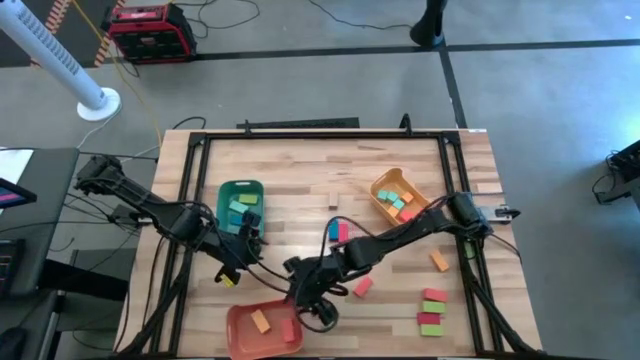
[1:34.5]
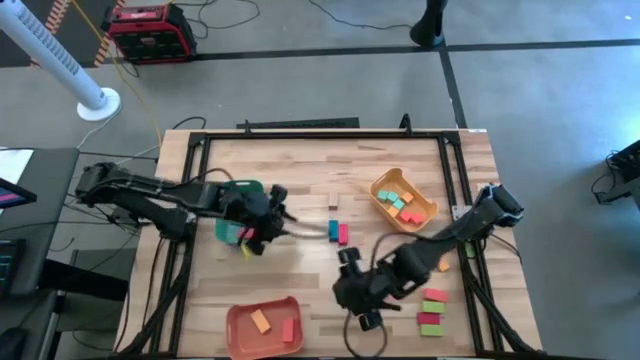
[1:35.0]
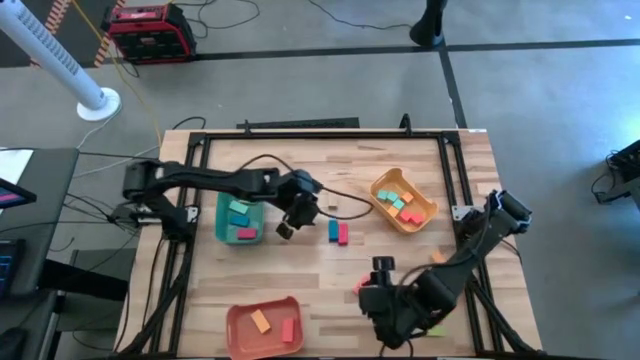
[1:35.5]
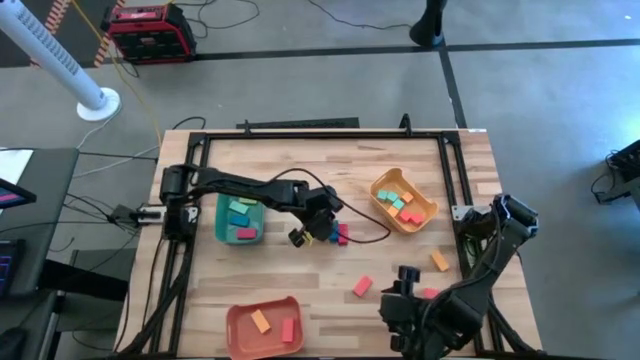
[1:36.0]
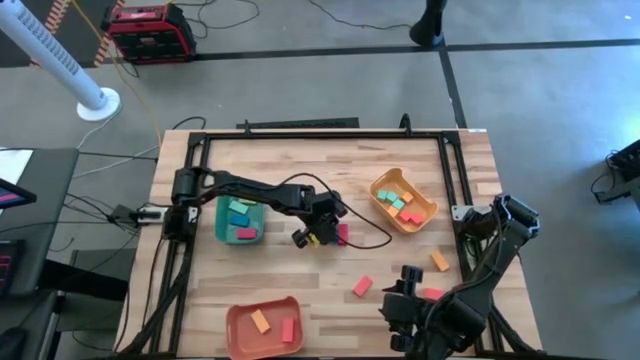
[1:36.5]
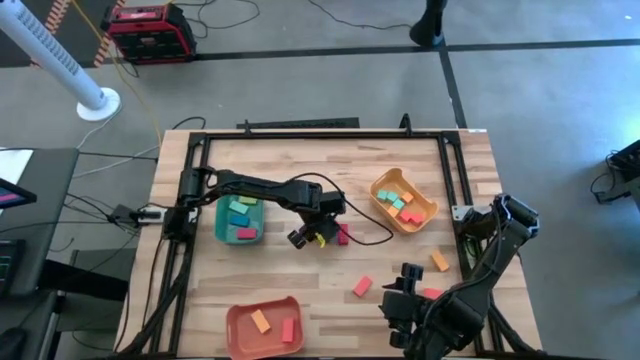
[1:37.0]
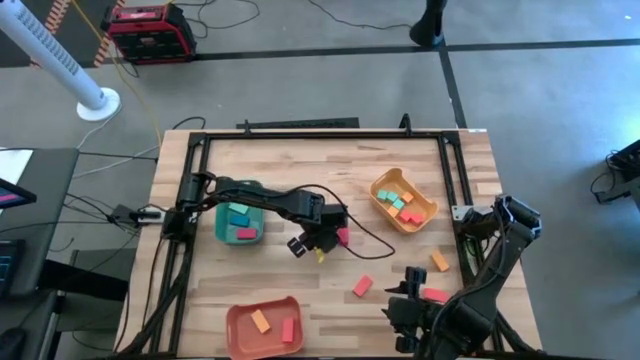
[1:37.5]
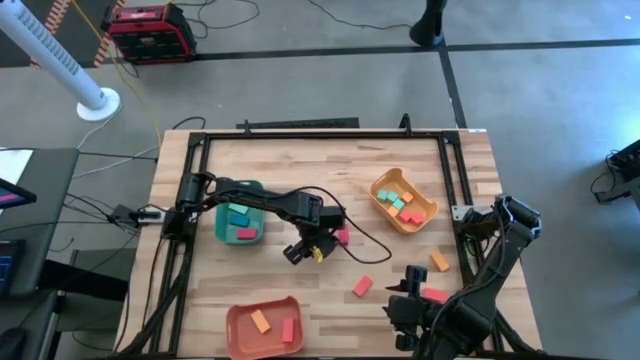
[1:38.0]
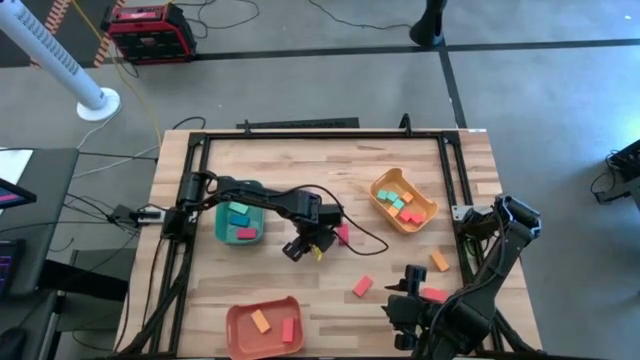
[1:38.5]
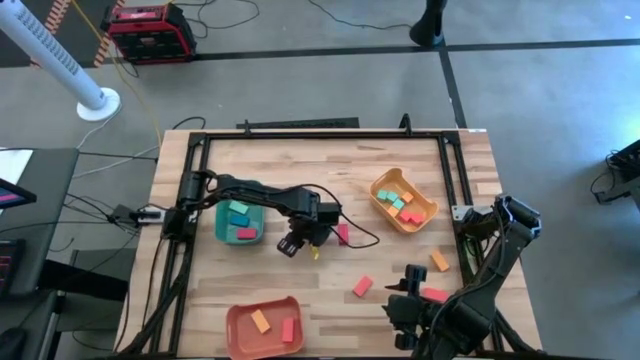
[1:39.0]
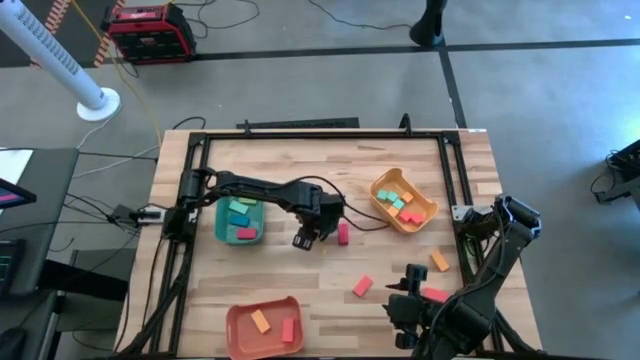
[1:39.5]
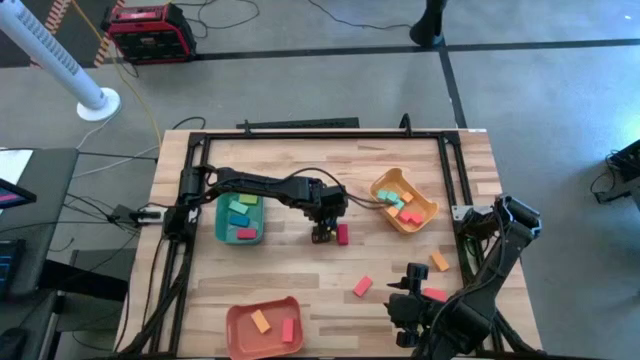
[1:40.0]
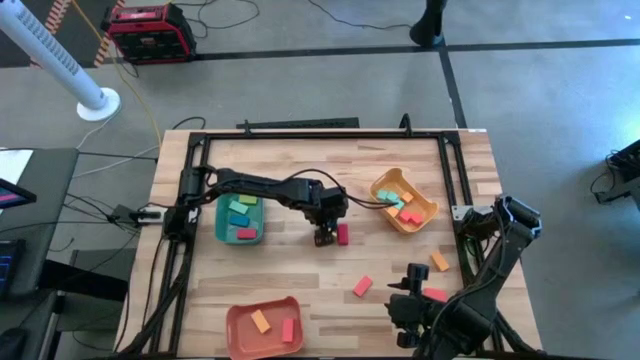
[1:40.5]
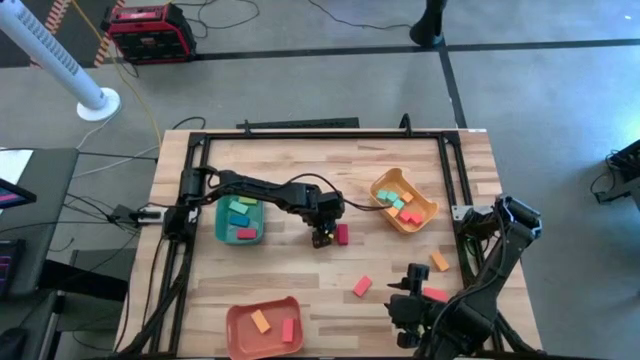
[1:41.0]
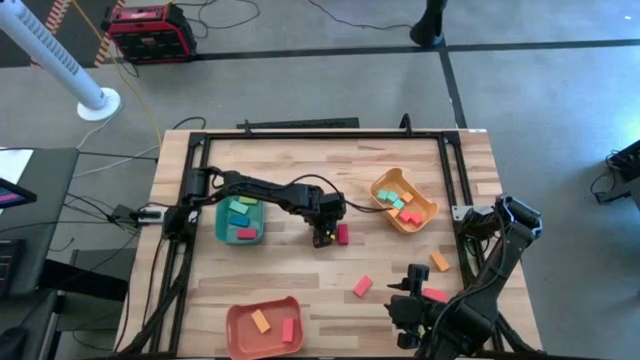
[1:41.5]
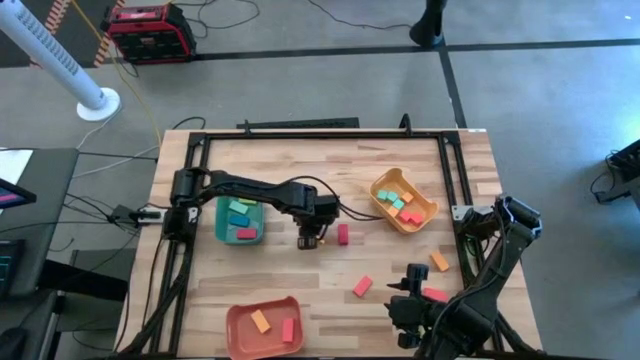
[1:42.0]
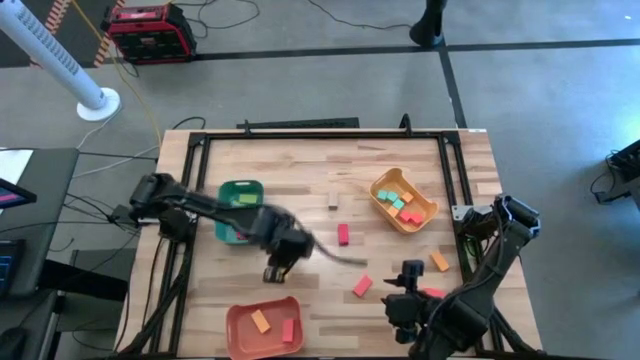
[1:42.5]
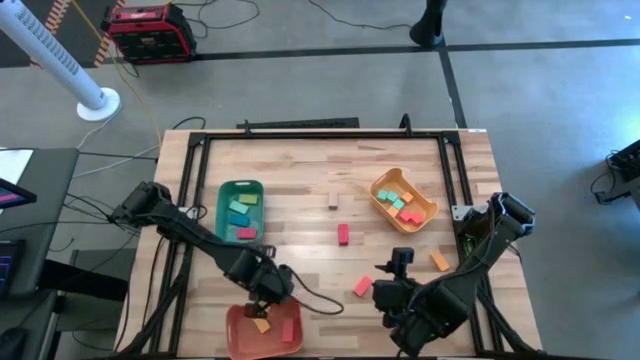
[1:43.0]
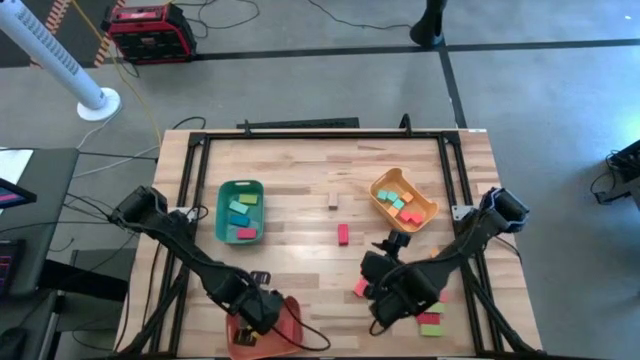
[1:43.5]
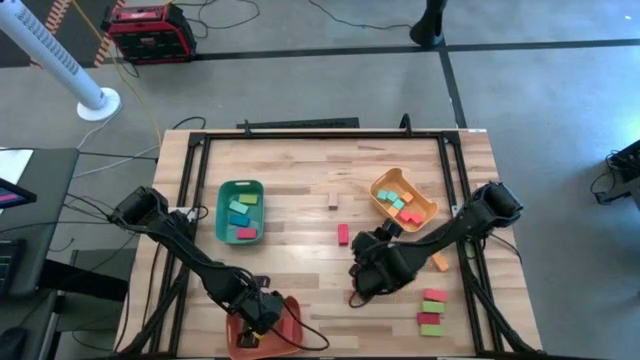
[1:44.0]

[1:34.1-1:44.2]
Task: Sort blocks by size
Put the thick blue rectangular block into the orange bin

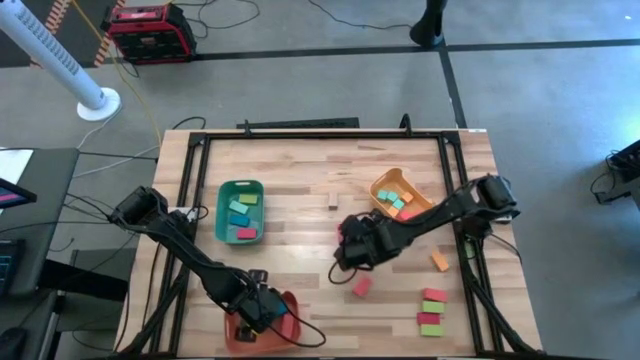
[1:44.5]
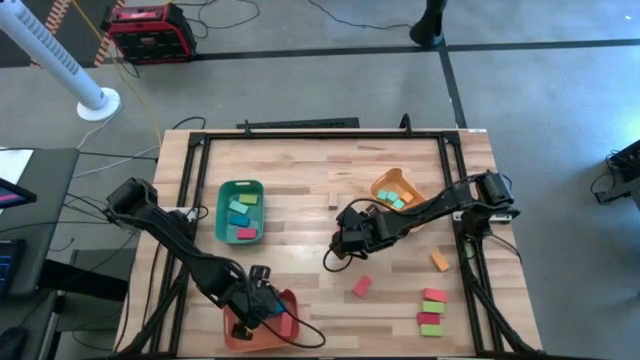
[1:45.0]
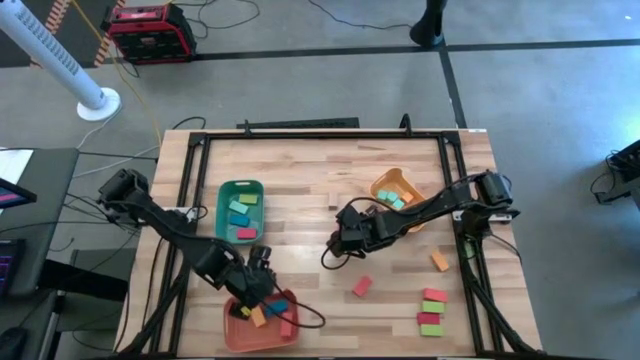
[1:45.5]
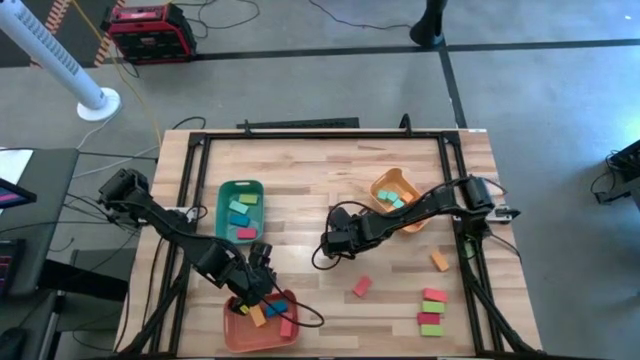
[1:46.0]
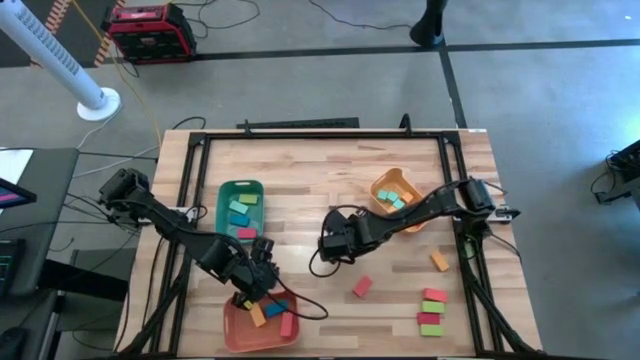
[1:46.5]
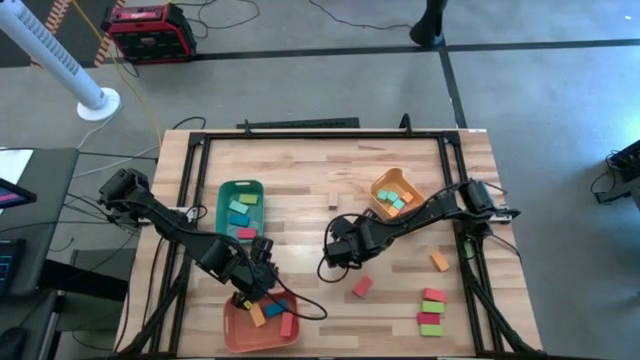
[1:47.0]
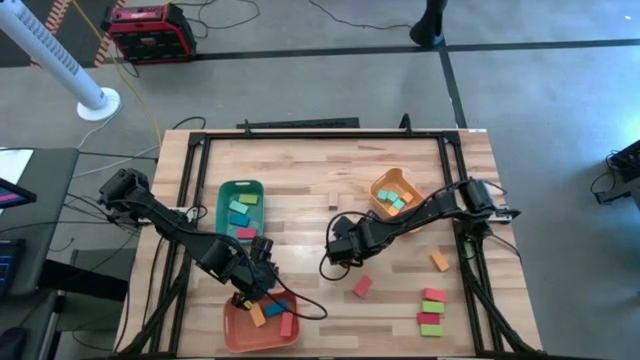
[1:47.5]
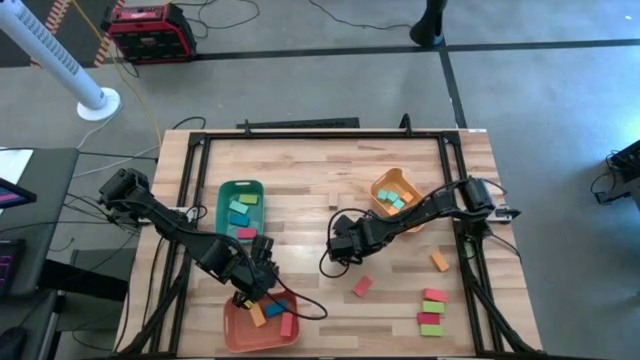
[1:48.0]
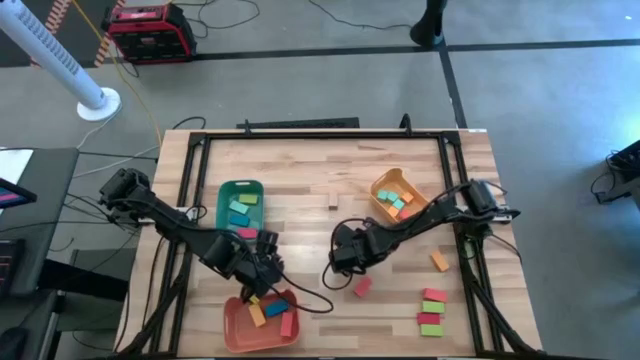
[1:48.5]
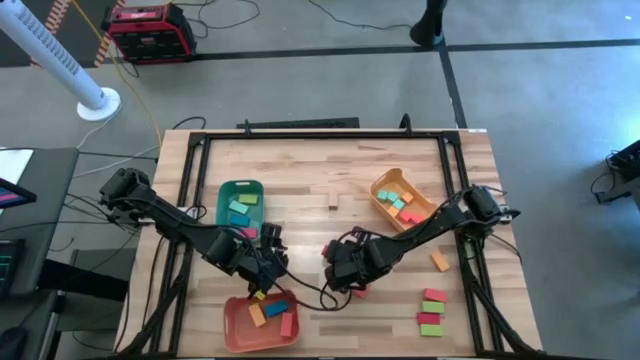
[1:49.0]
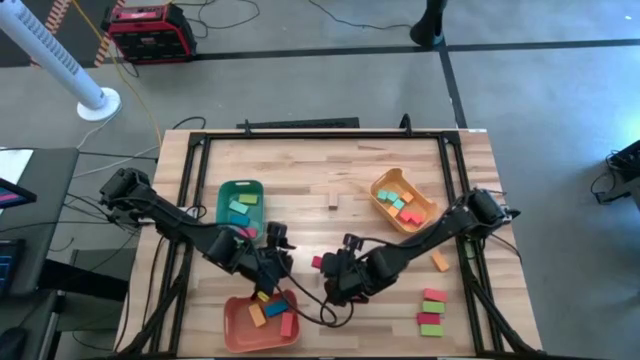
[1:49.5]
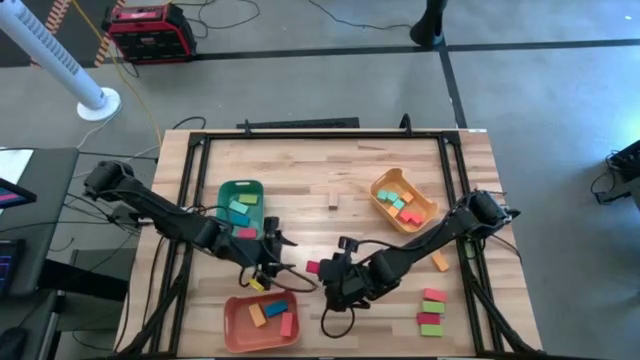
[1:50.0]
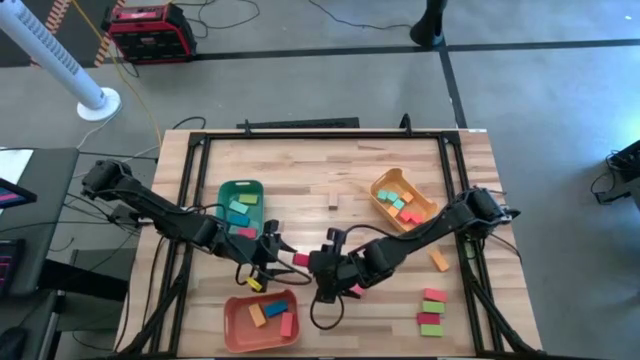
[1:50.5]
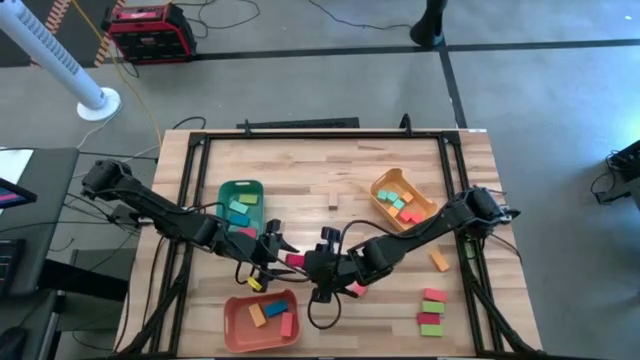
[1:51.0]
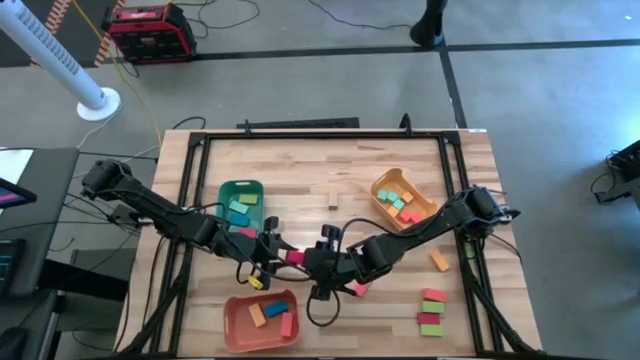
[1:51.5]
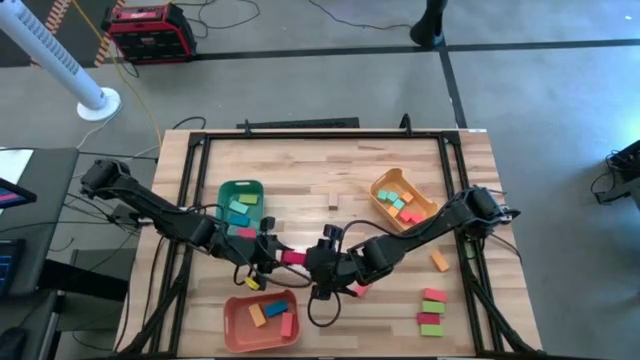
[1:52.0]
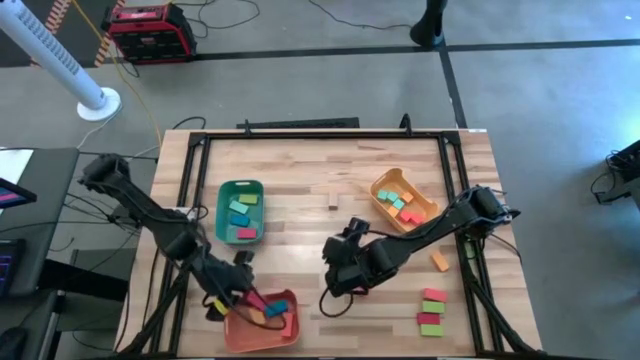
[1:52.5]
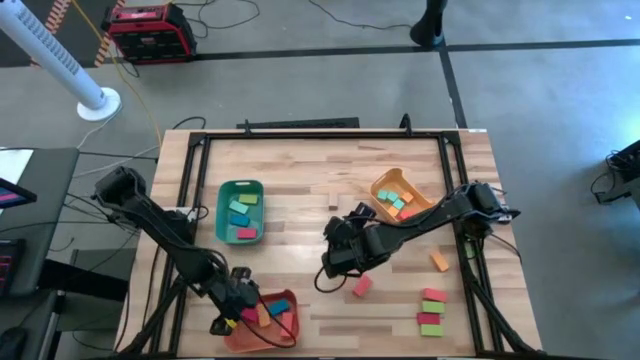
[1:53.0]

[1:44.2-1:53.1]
Put the thick red rectangular block into the orange bin

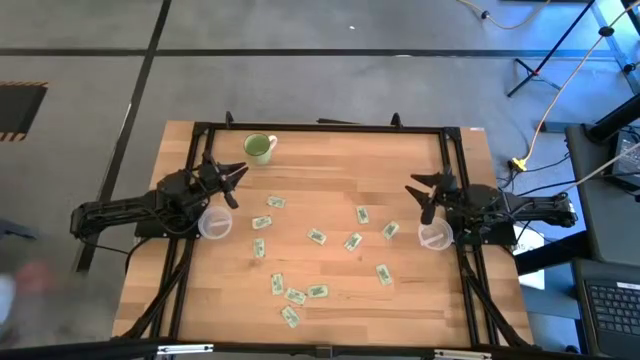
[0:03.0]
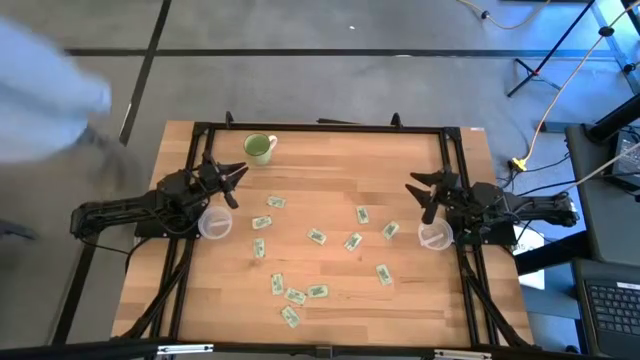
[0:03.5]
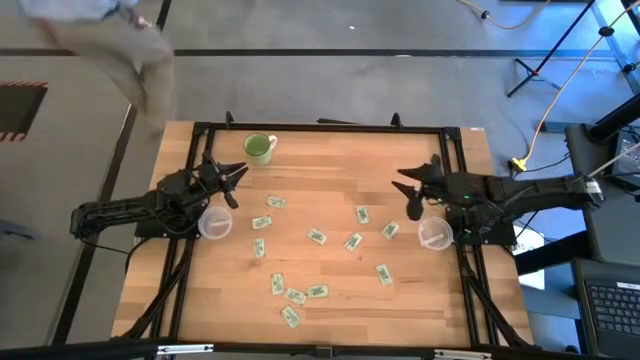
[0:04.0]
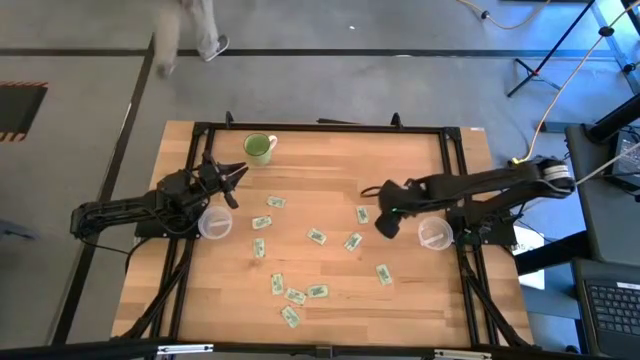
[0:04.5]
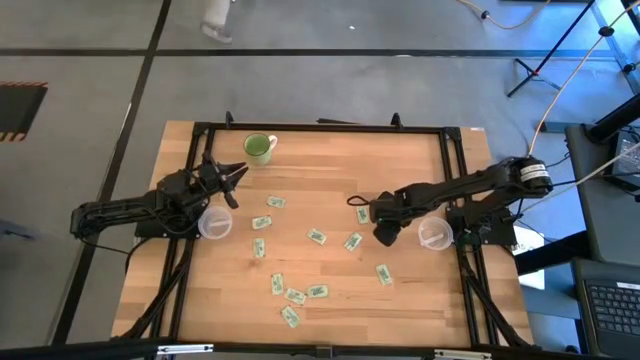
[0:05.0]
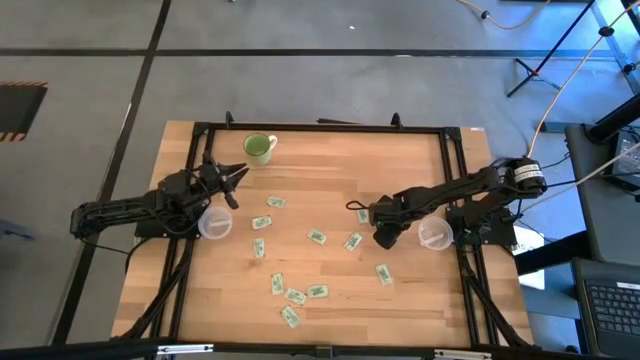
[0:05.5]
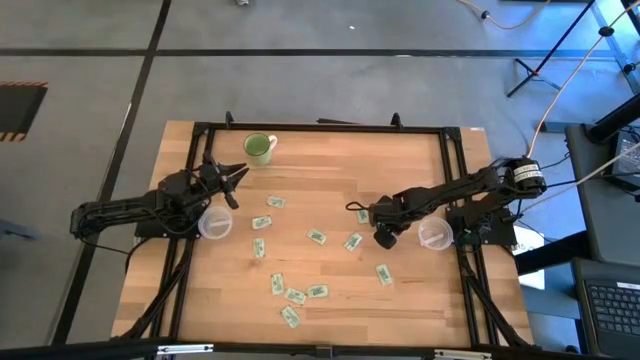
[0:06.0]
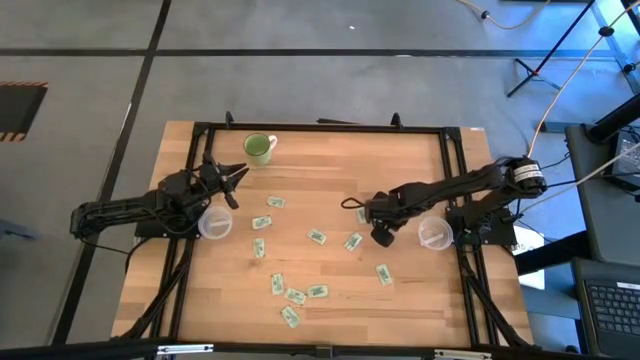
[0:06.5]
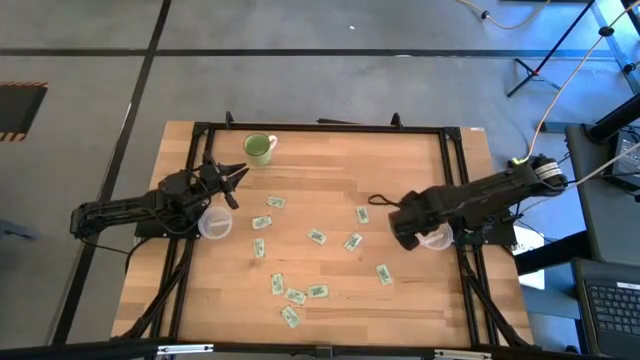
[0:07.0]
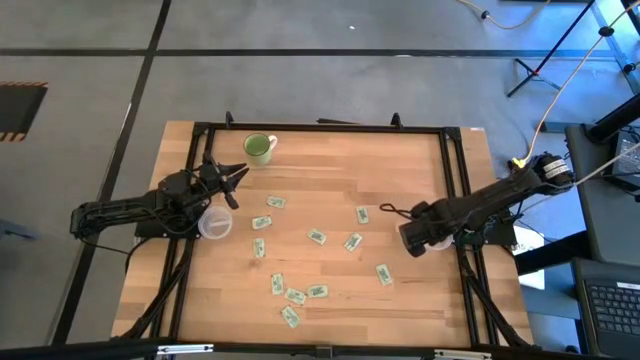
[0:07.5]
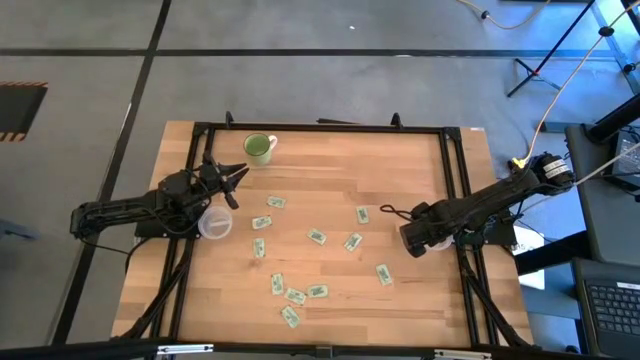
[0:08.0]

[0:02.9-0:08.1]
Task: Pick and place items into bin
Put the white stevia packet into the right transparent bin
